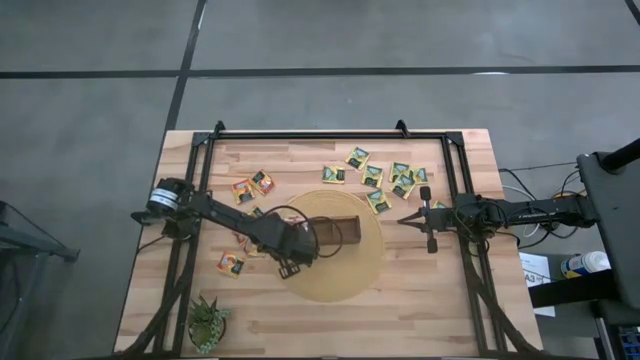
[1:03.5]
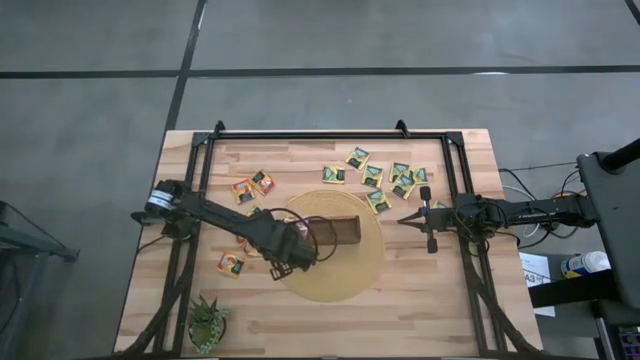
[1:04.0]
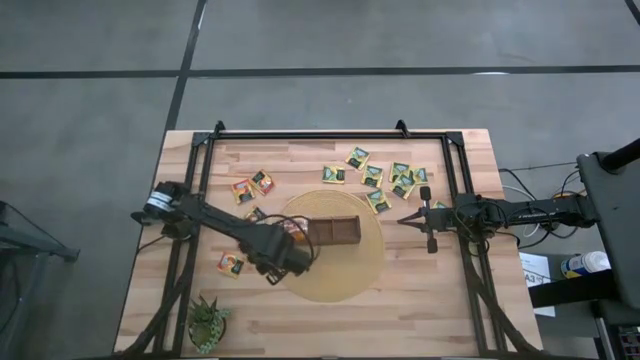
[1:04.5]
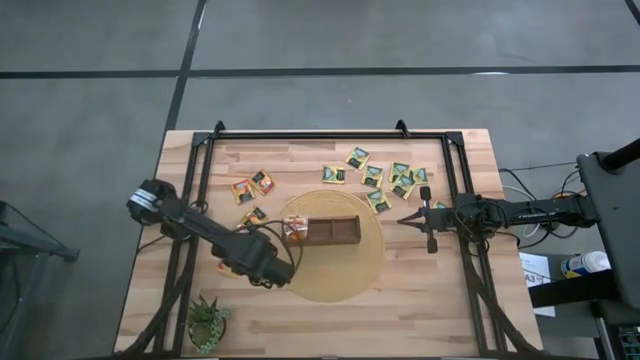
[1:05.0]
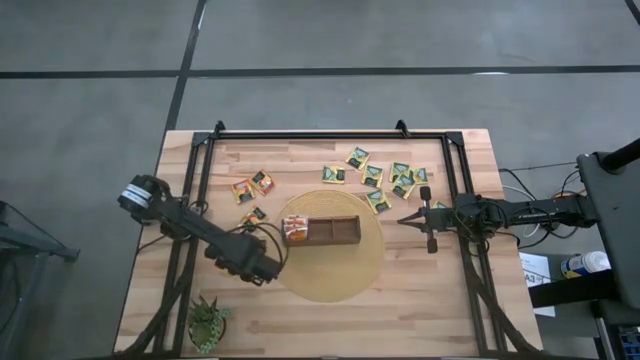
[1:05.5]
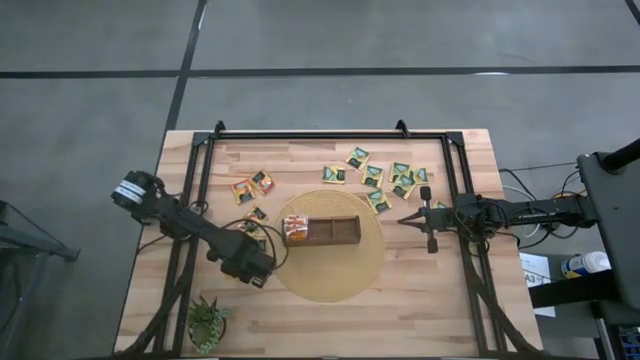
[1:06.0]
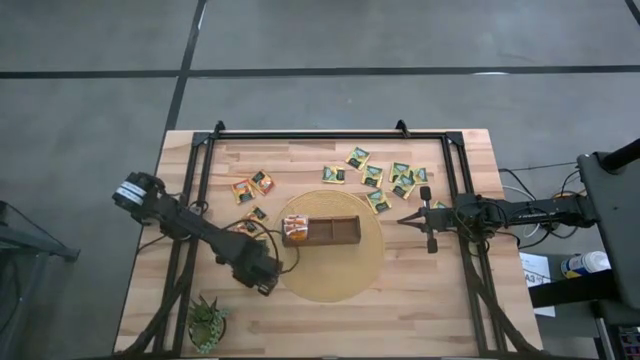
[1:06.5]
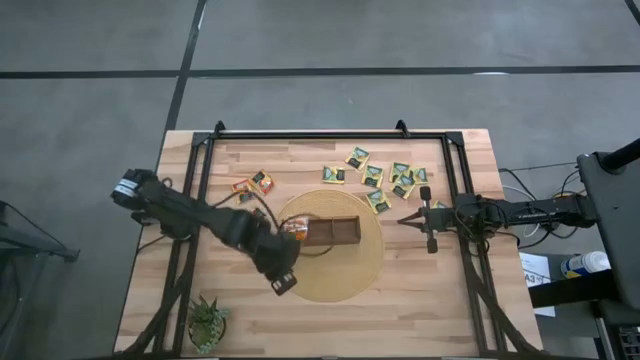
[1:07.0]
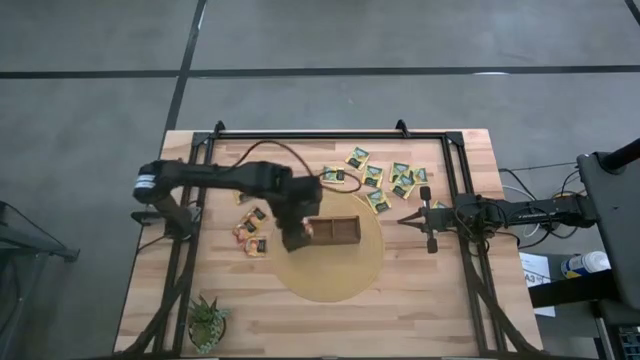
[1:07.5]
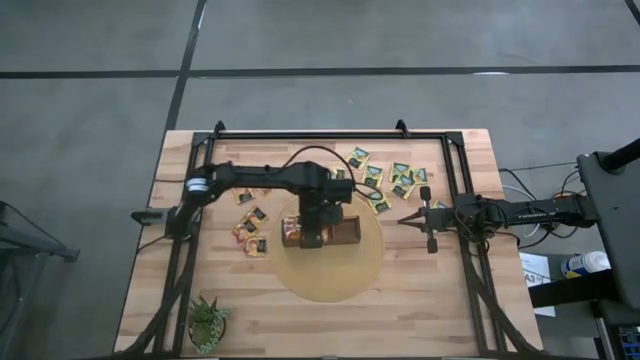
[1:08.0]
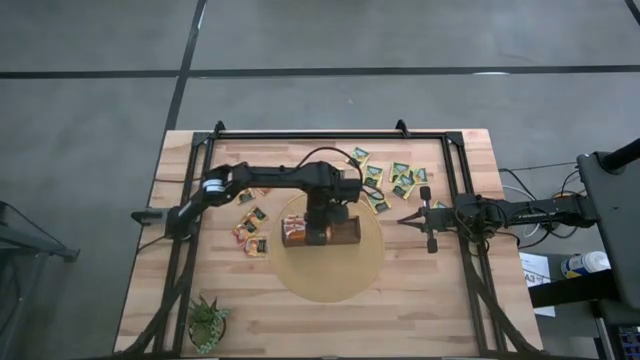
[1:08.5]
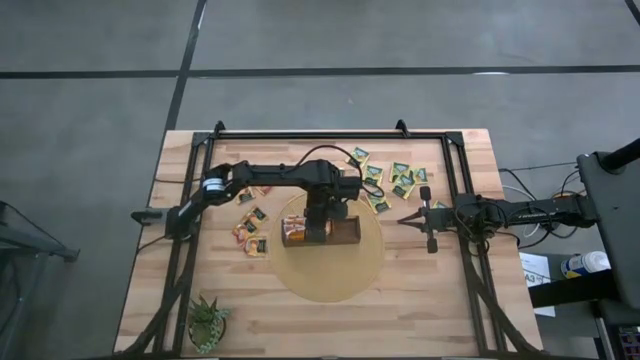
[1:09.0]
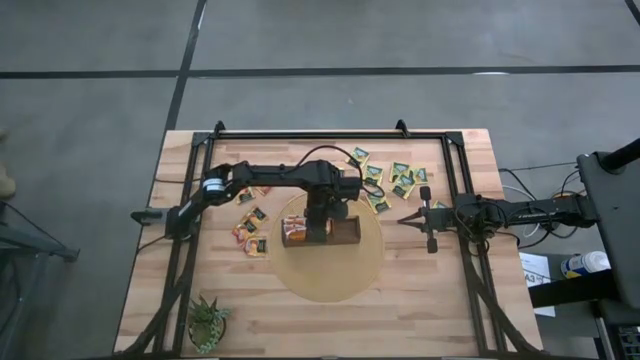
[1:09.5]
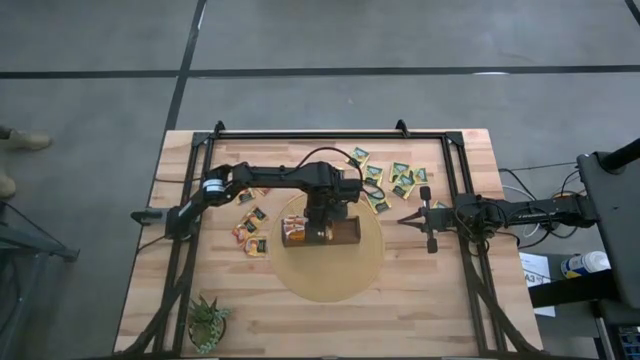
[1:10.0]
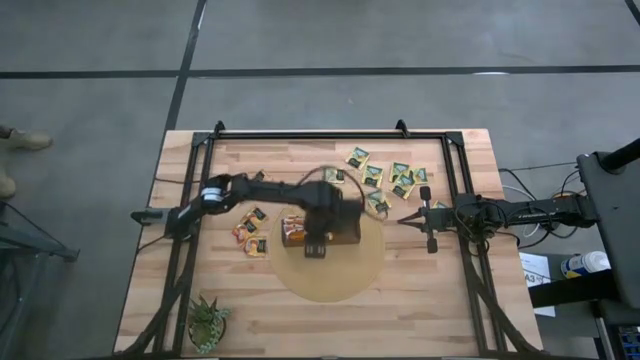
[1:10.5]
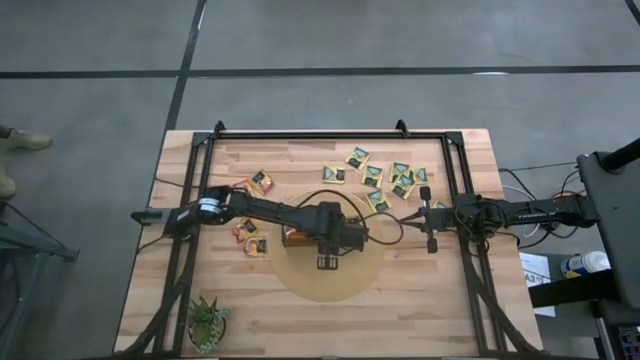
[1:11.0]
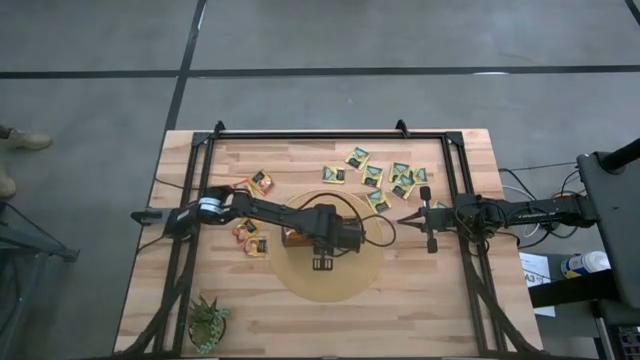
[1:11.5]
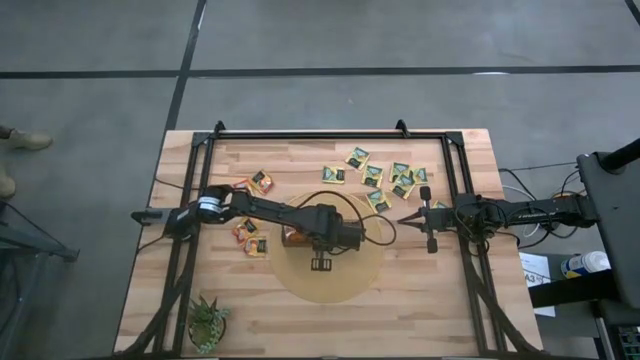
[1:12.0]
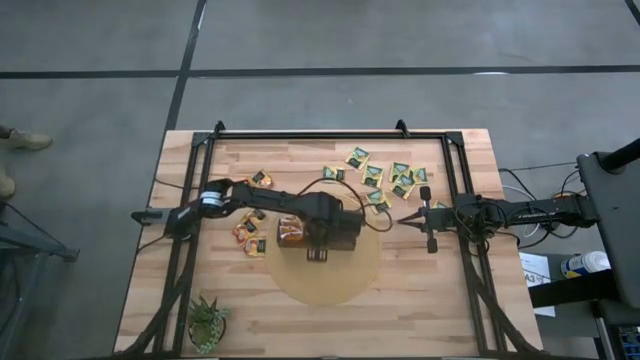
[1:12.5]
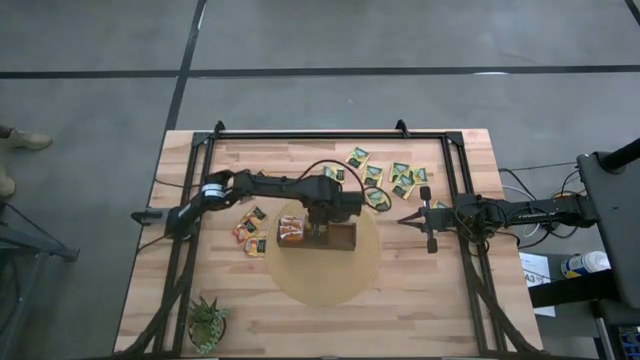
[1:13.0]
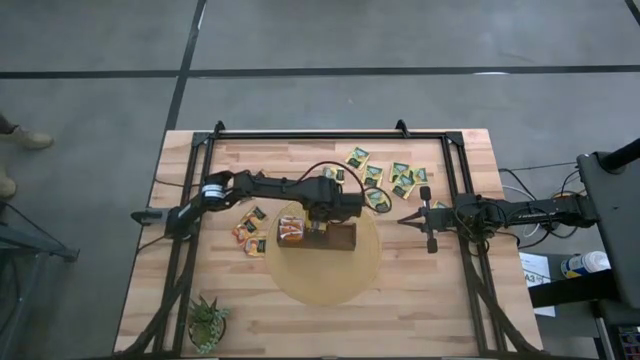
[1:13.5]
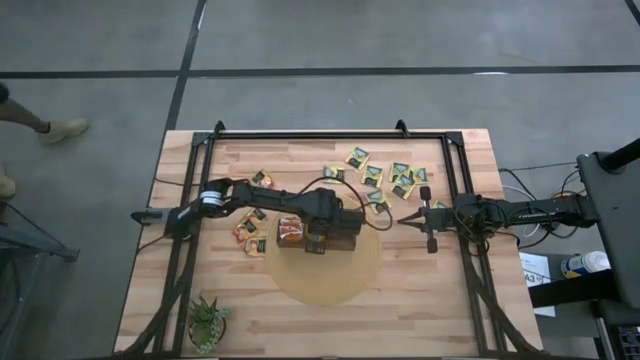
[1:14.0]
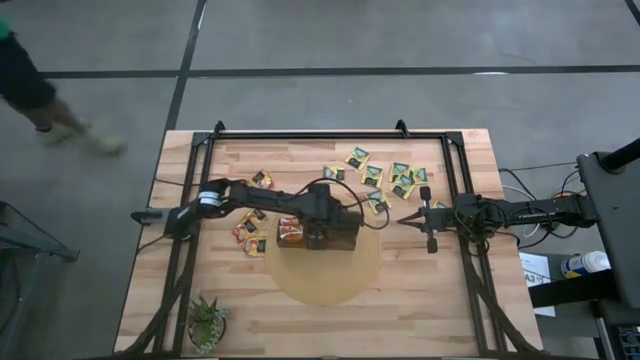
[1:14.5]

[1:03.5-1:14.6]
Task: Pick & Place Tea
Put the orange tea bag into the middle section of the wooden organizer

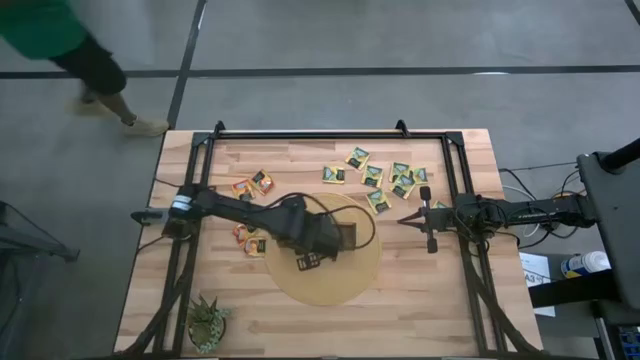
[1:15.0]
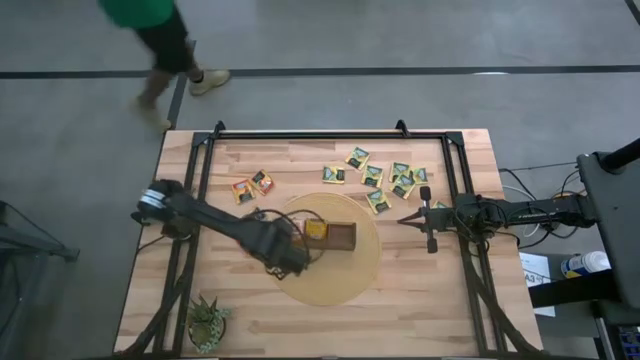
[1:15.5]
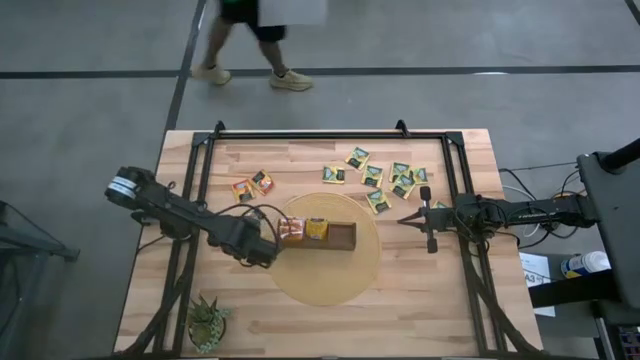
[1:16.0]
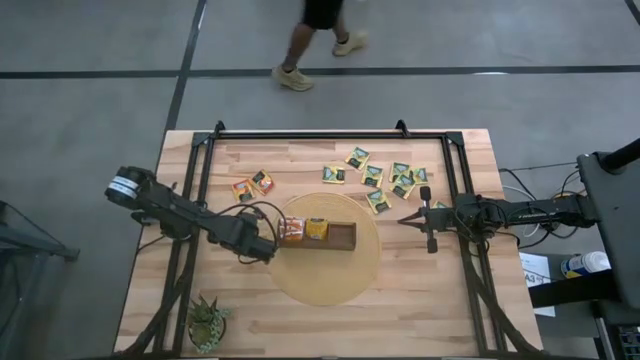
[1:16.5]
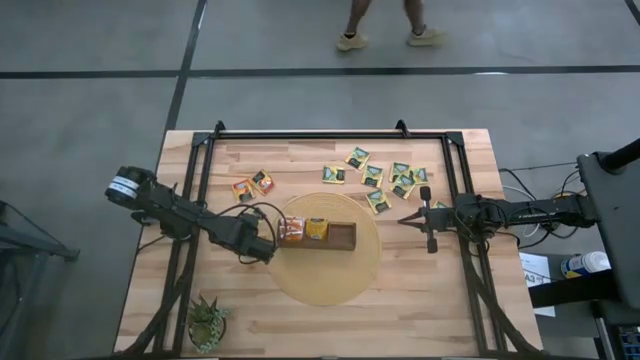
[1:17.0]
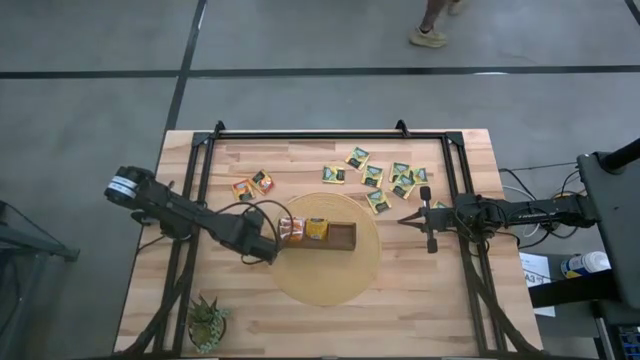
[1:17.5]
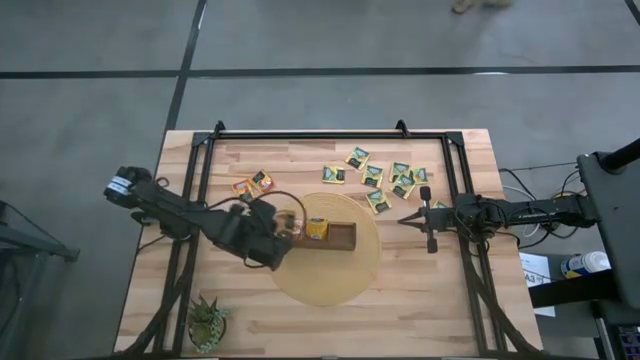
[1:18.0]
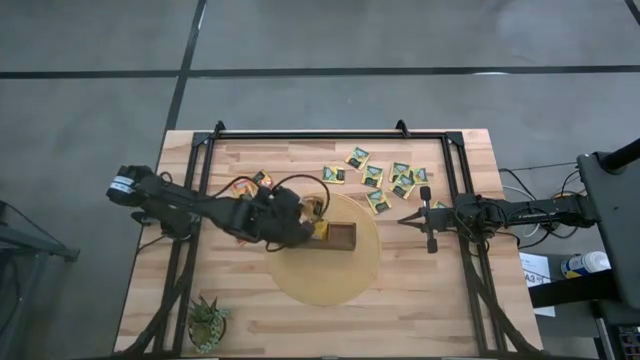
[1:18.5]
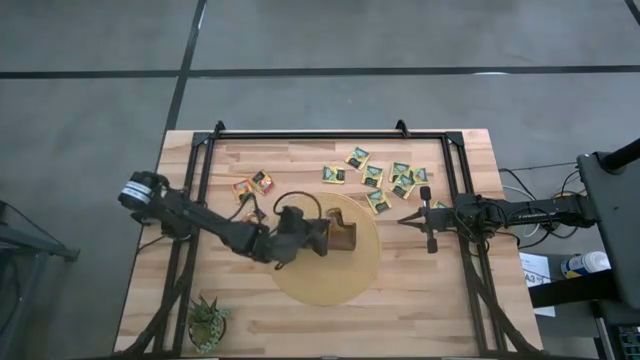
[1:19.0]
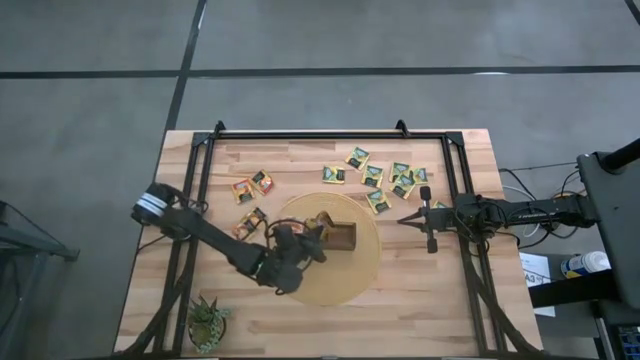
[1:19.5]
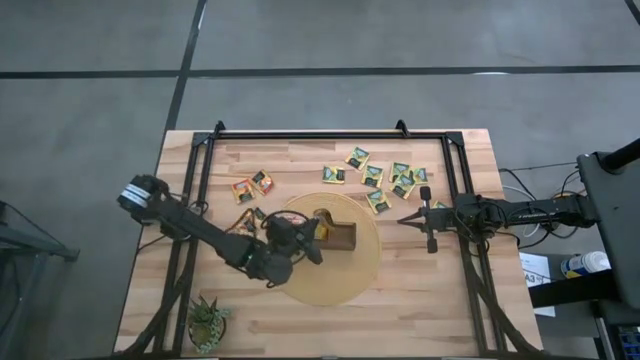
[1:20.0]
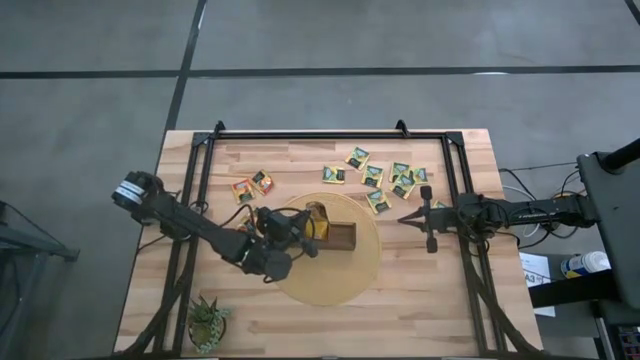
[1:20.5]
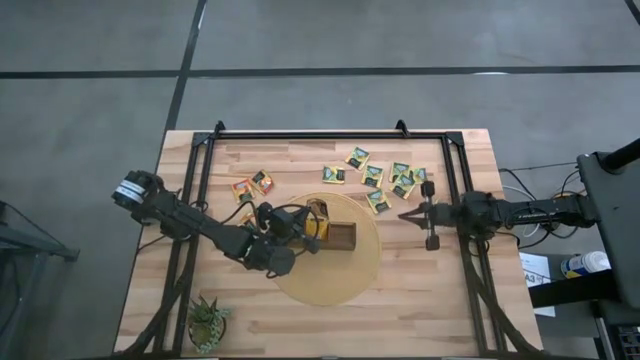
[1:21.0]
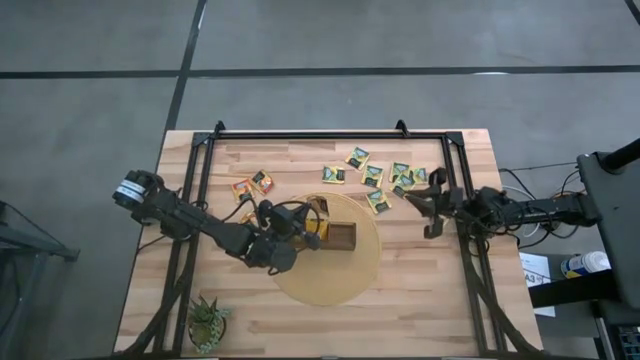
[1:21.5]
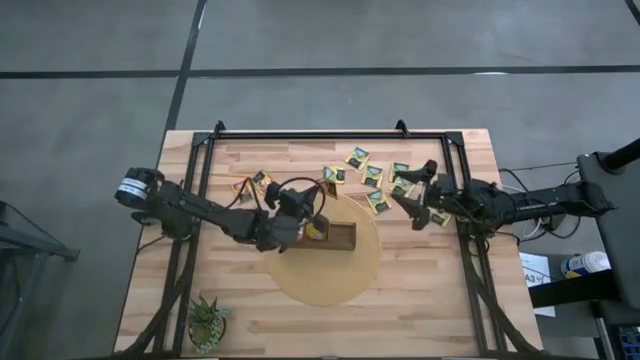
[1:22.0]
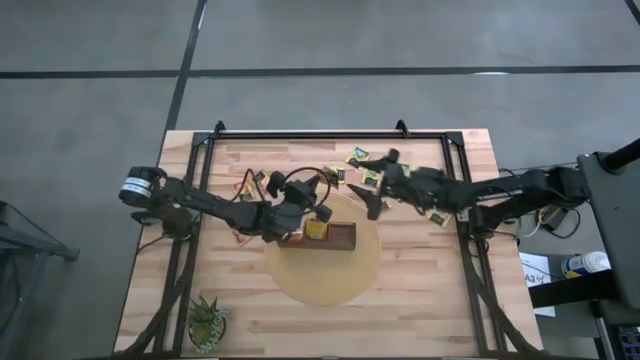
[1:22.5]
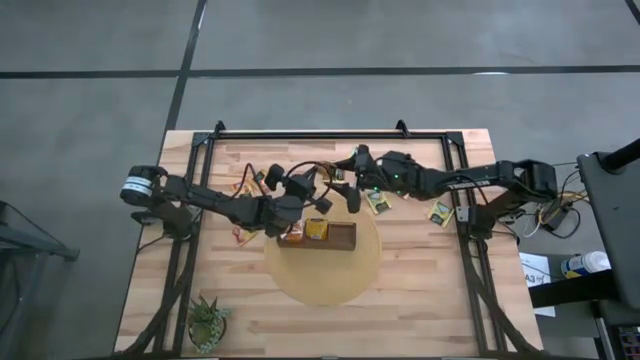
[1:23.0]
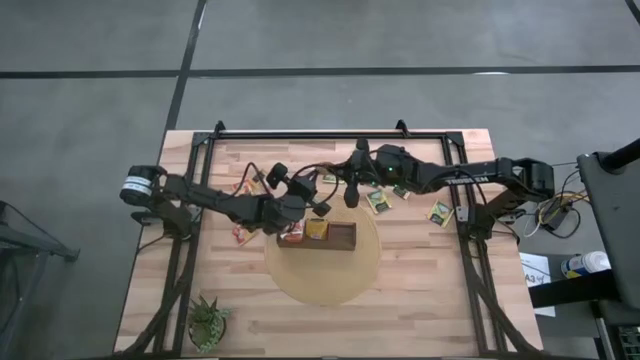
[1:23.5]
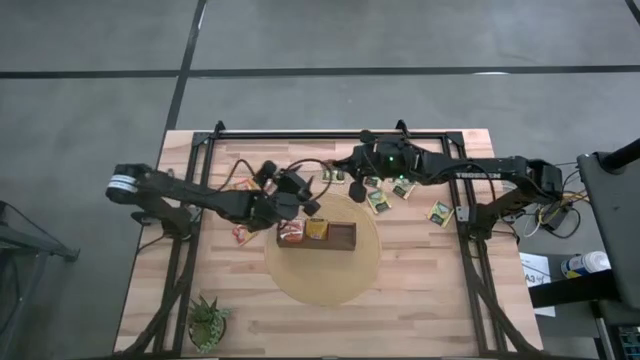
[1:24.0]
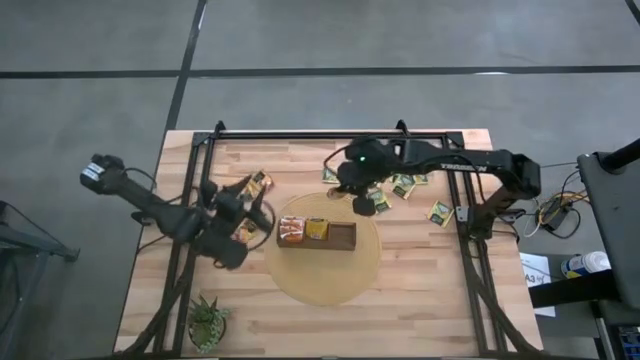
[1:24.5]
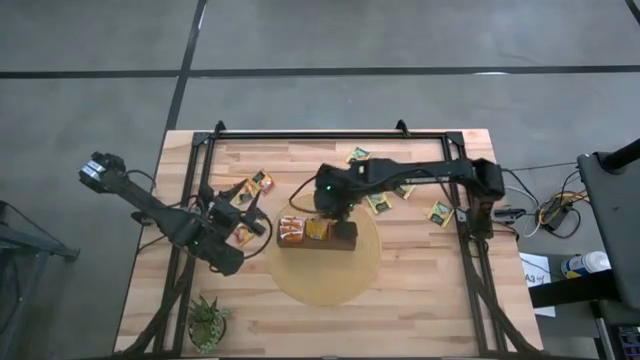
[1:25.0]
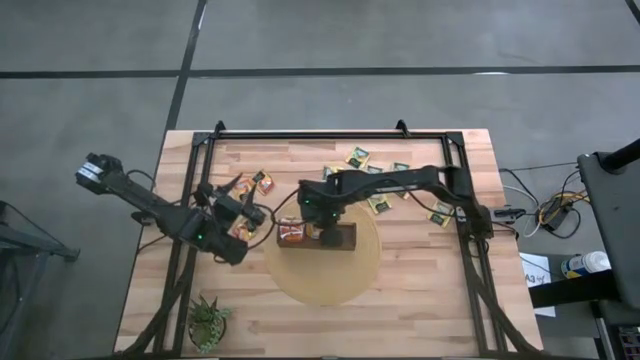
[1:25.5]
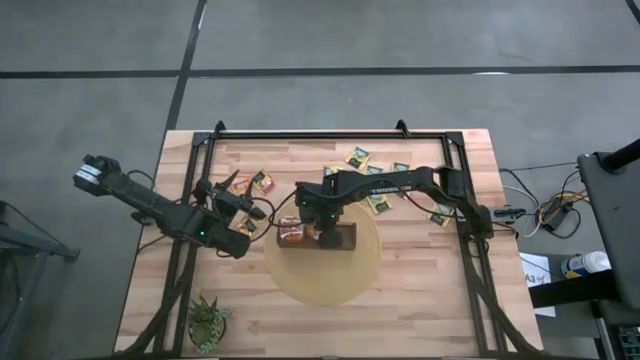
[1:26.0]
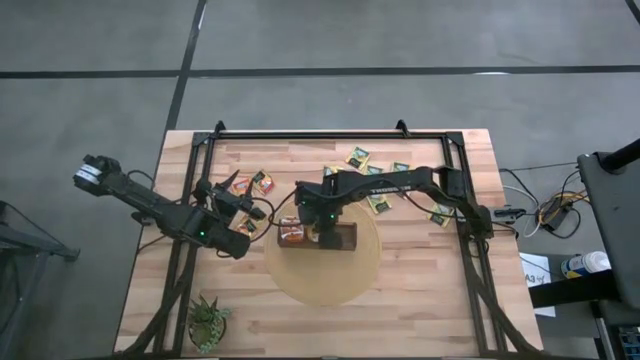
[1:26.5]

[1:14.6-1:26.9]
Put the orange tea bag into the middle section of the wooden organizer
